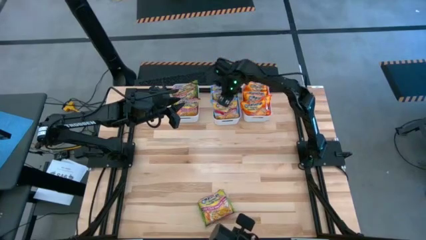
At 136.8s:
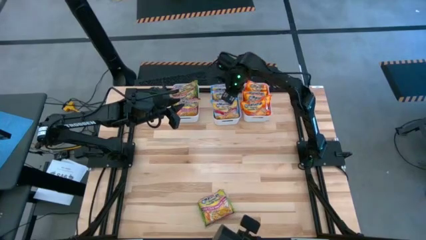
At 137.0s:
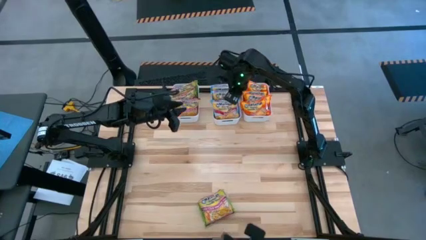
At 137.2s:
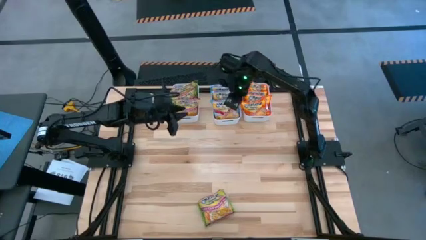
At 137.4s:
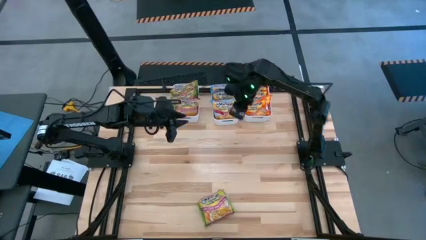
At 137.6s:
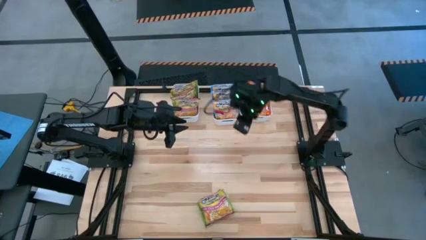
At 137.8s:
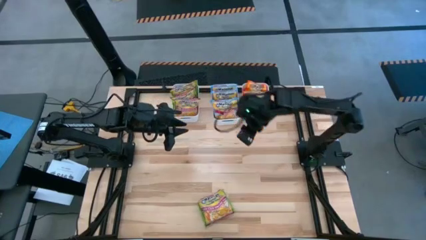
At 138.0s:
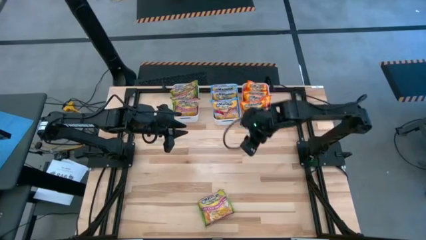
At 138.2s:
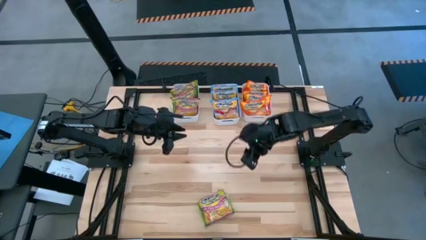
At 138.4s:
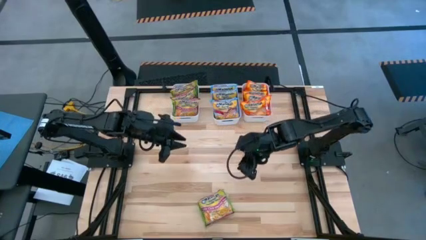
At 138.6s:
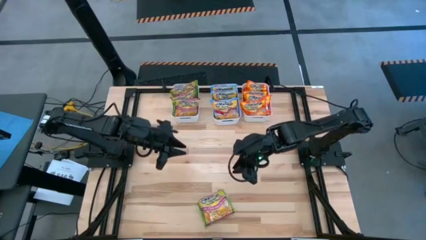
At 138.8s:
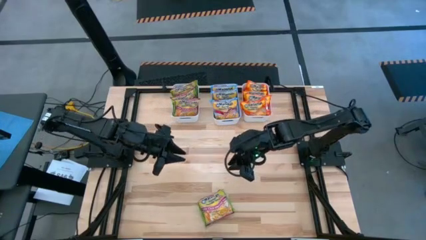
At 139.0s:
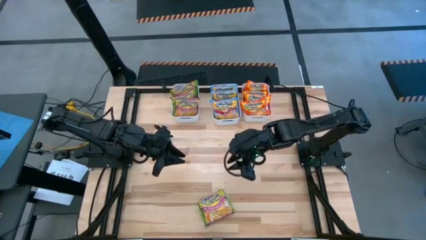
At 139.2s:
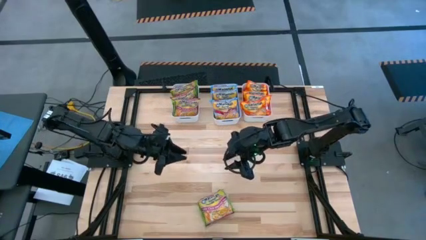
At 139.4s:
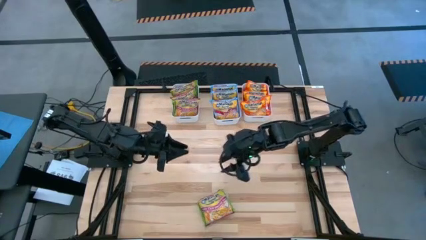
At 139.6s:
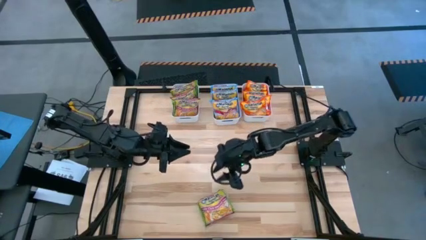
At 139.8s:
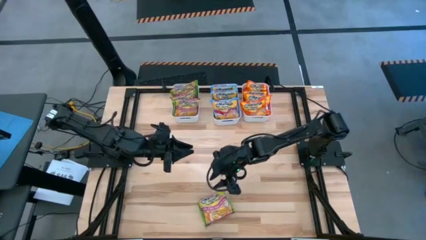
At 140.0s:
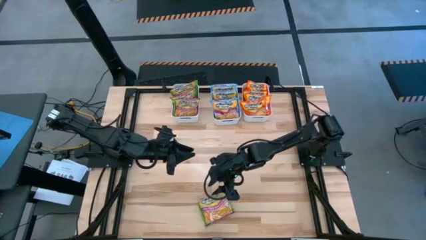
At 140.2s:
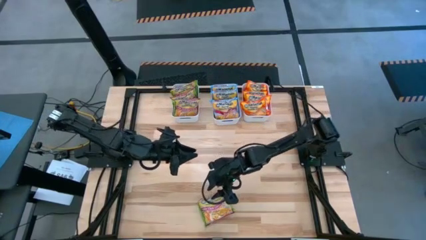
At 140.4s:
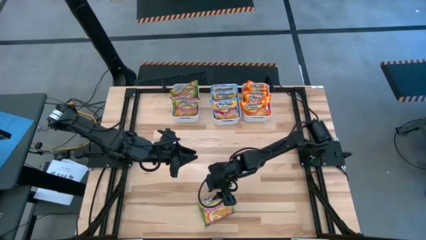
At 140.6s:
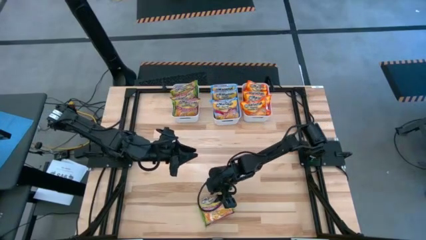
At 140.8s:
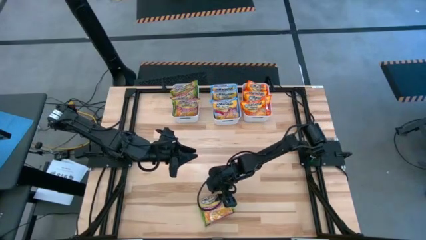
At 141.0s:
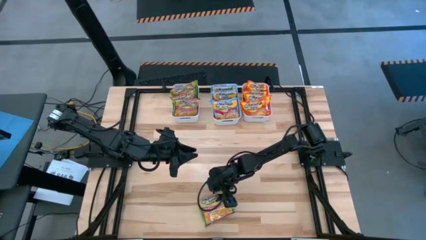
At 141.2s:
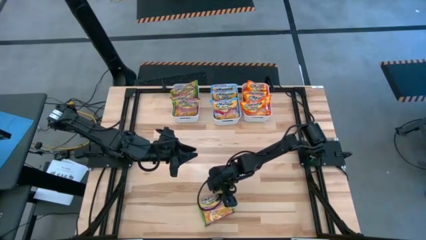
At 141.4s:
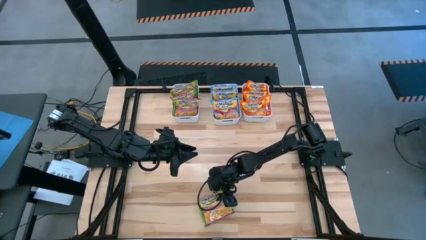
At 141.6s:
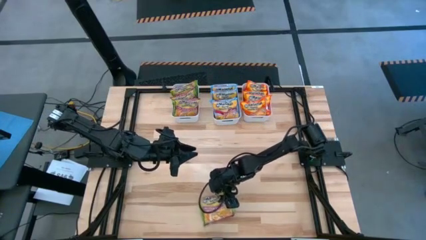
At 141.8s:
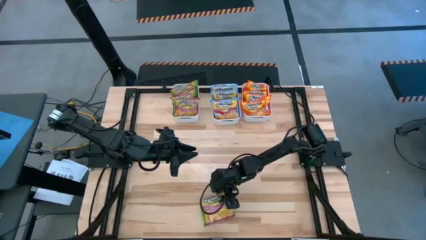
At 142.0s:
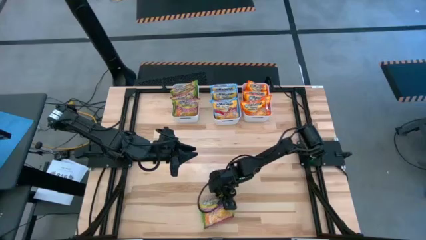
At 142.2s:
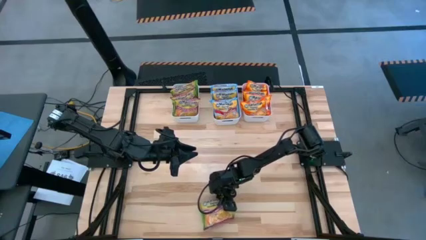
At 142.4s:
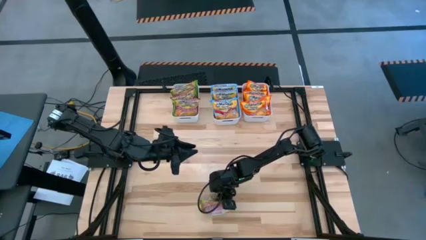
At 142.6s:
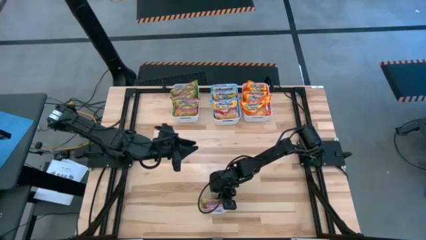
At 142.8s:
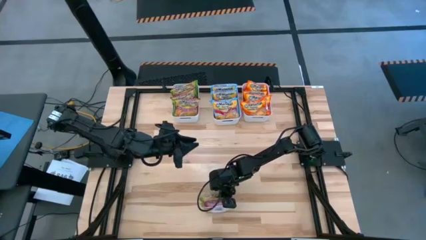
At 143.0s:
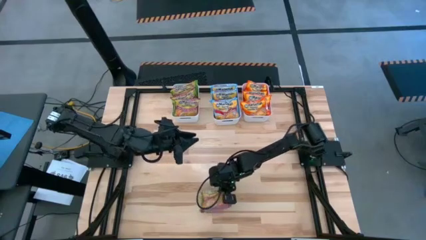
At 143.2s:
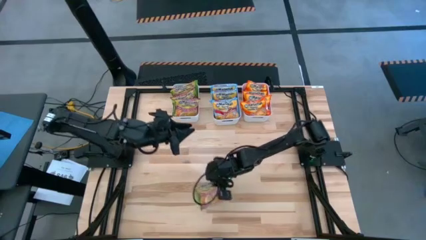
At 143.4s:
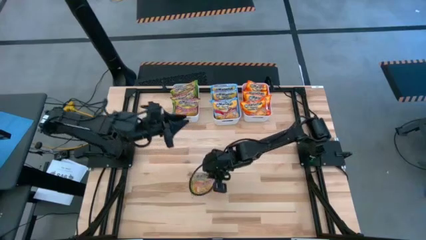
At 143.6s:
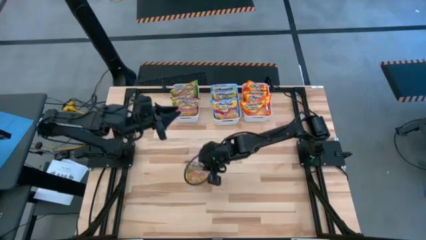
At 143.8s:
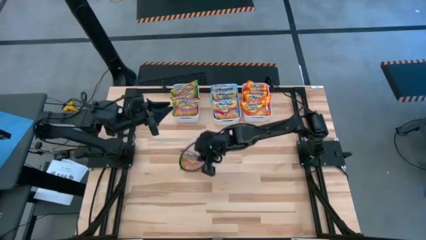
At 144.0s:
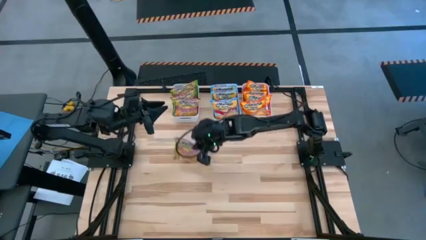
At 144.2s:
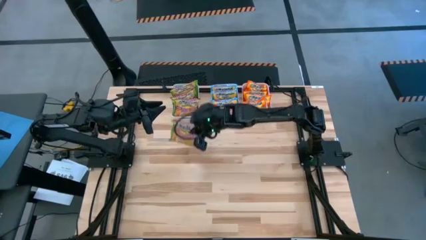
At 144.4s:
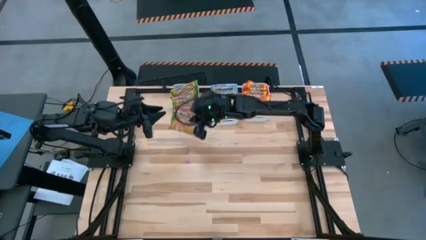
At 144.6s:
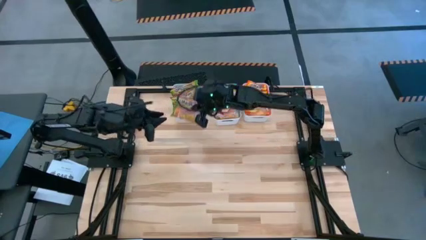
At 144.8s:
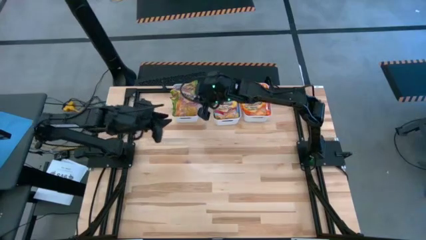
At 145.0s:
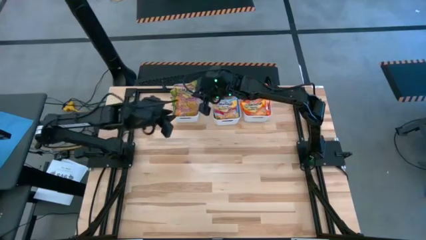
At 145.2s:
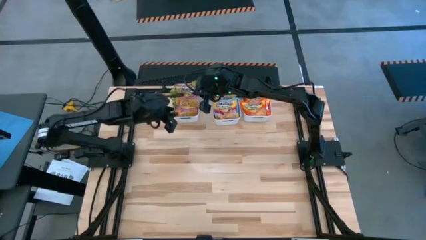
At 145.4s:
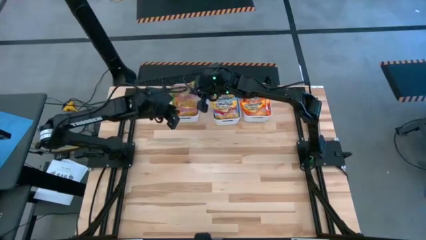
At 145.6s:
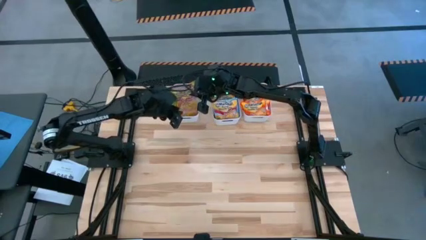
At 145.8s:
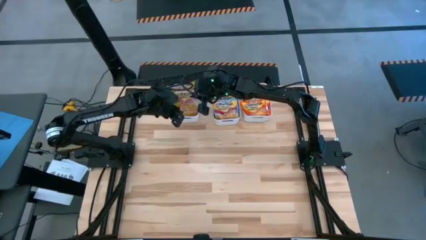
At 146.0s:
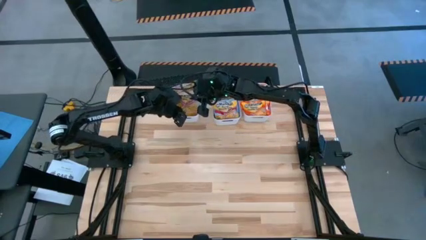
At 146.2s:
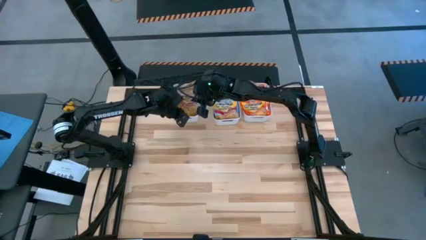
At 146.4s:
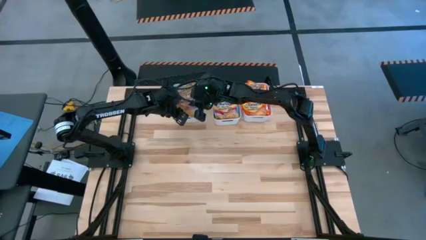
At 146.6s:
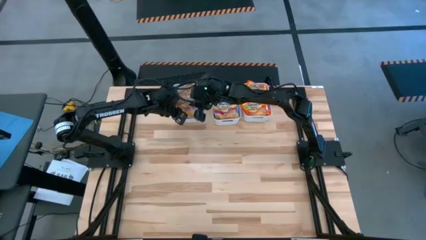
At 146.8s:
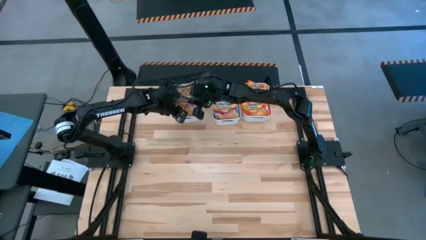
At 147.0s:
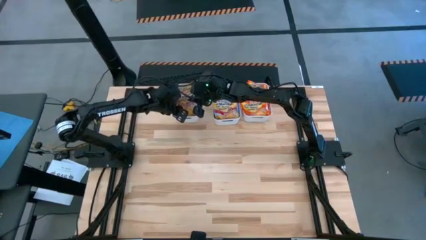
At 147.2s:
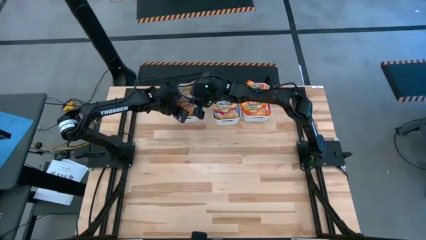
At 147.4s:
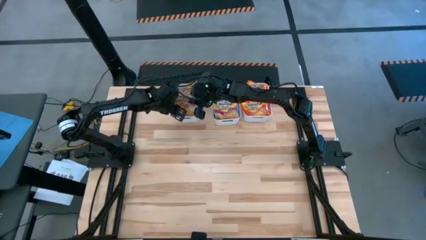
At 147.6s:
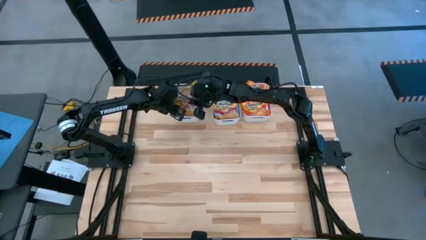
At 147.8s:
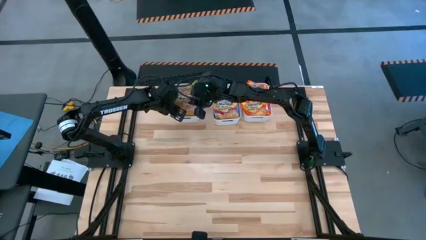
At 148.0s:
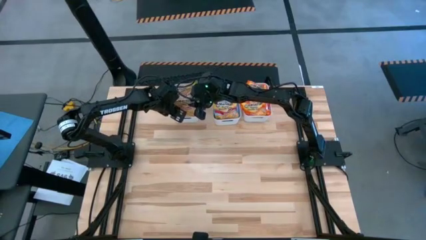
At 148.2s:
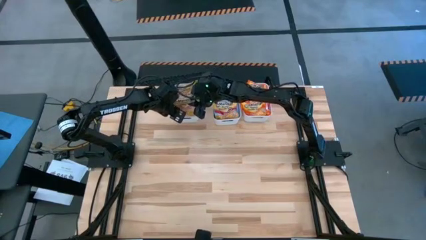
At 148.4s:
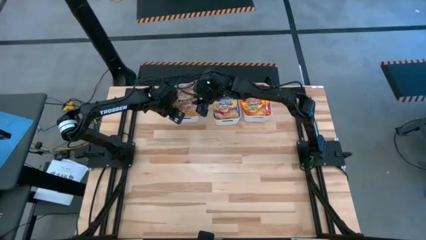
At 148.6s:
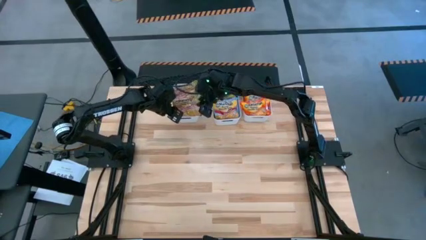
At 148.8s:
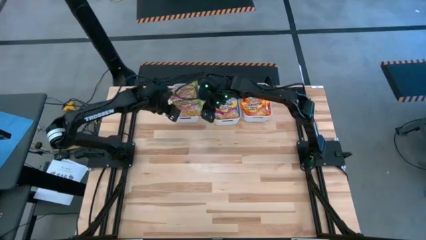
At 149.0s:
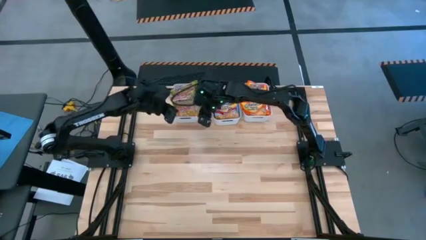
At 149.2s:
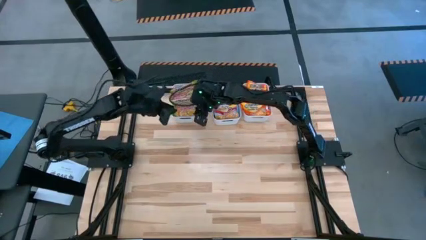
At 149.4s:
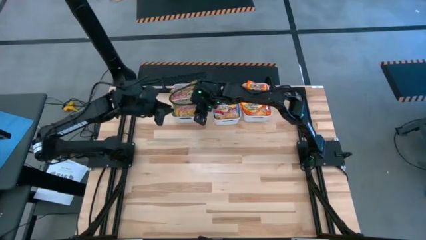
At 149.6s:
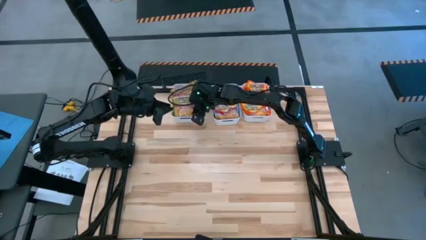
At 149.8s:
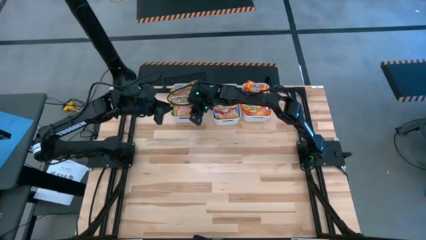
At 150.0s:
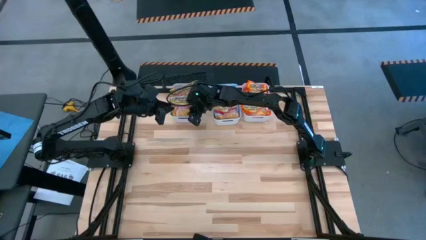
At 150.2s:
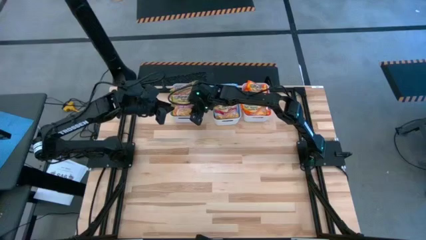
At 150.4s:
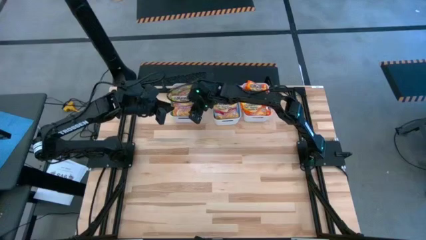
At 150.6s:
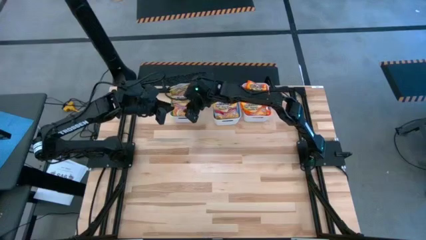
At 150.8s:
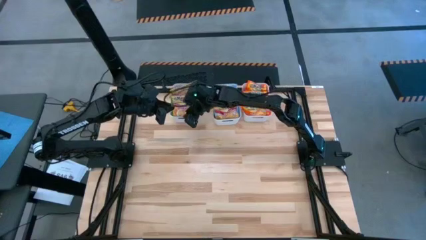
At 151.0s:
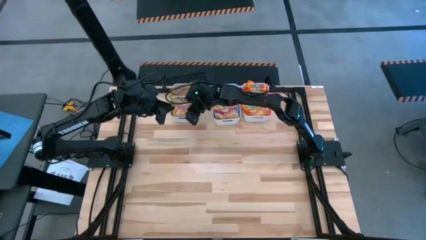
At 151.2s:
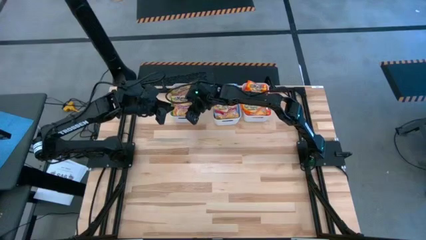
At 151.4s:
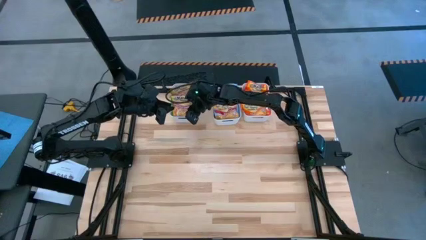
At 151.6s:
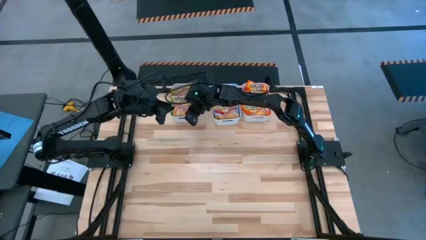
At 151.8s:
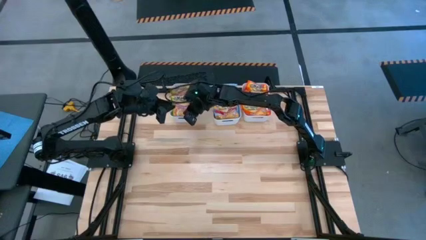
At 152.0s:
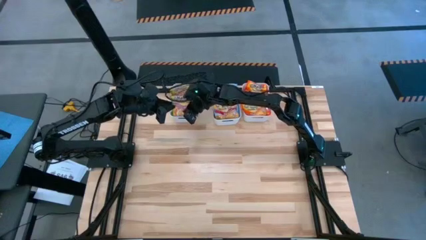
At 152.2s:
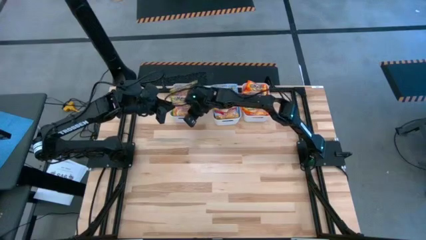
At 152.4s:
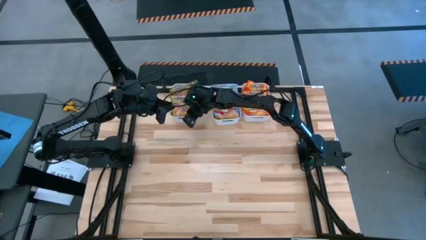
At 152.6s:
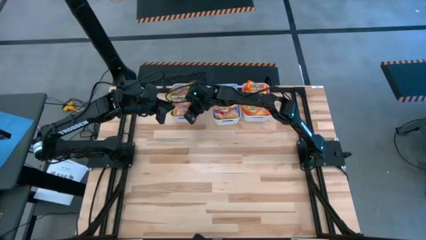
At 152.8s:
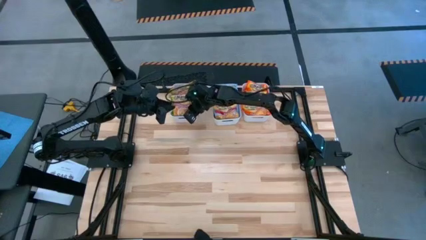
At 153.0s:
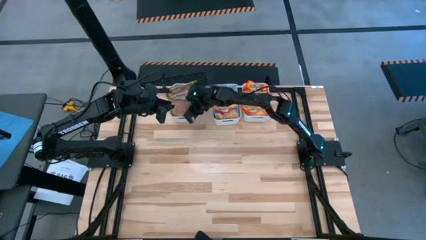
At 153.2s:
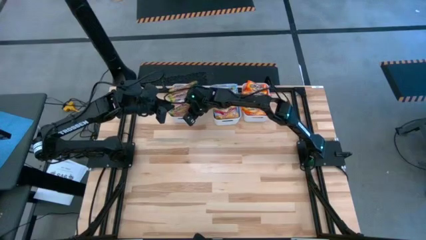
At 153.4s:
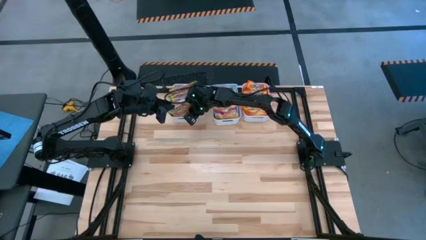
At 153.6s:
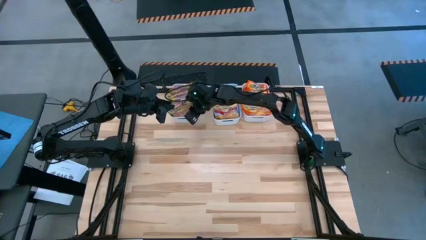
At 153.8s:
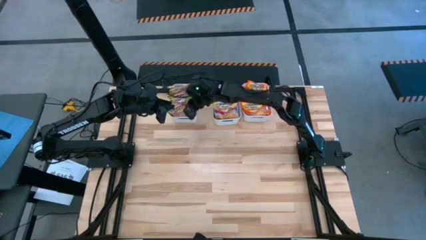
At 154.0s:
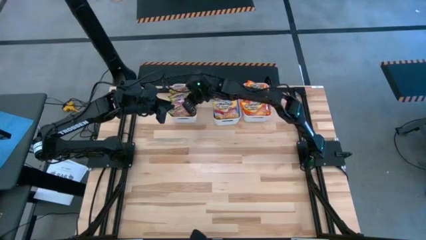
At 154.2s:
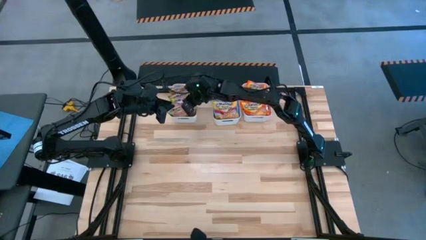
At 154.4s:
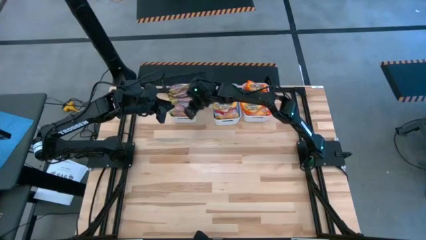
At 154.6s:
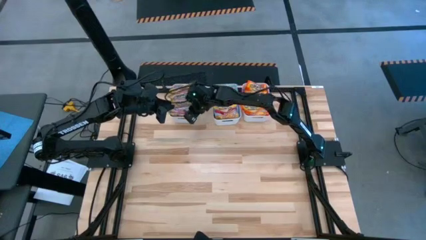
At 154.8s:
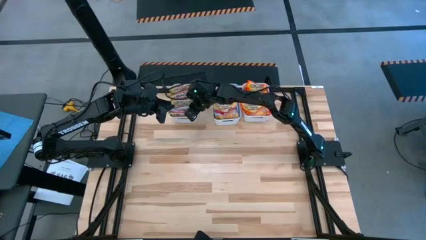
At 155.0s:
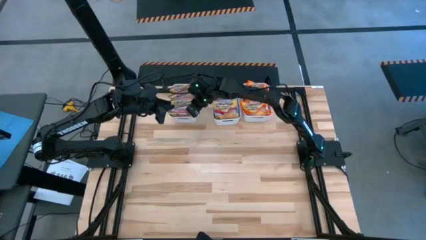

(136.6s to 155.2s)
Task: Sort Maruchan noodles
Put the green noodle pack into the left white bin
